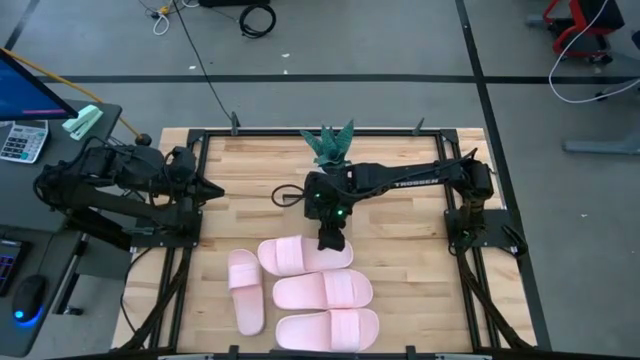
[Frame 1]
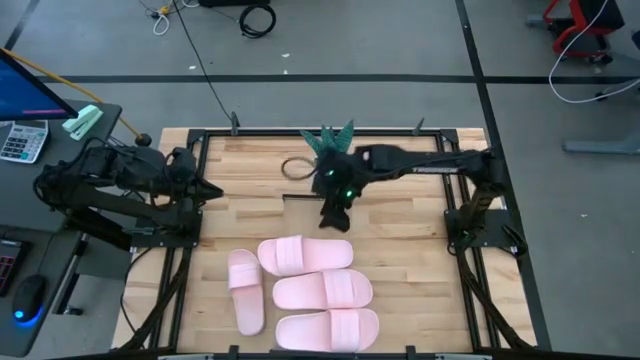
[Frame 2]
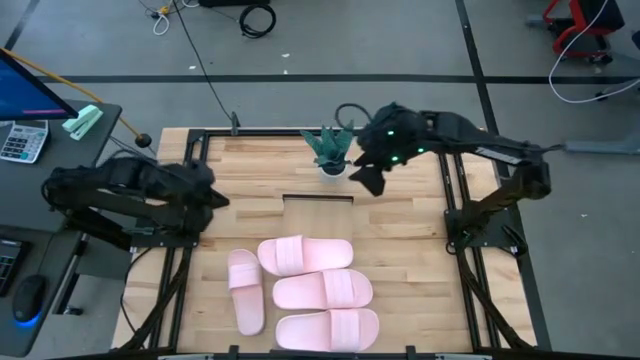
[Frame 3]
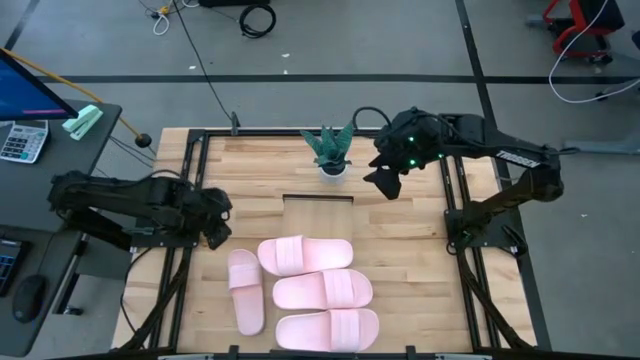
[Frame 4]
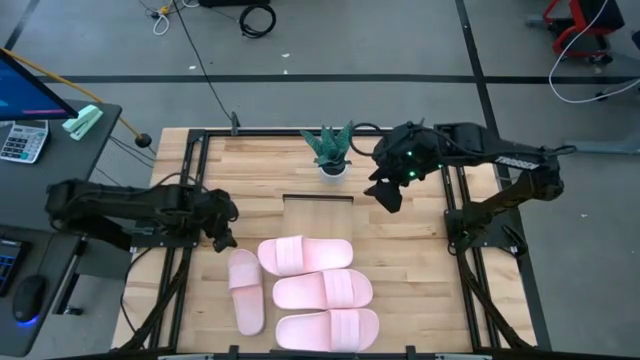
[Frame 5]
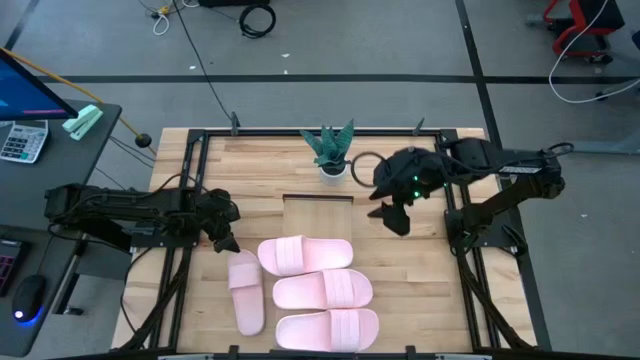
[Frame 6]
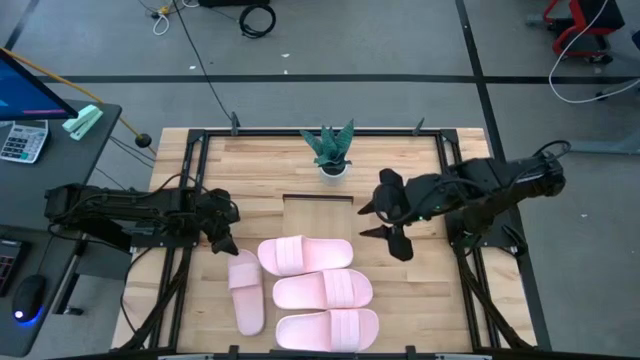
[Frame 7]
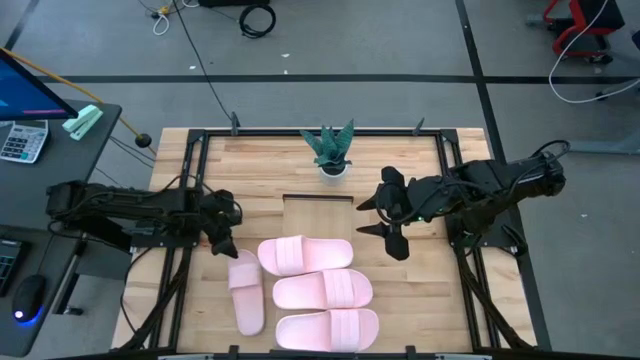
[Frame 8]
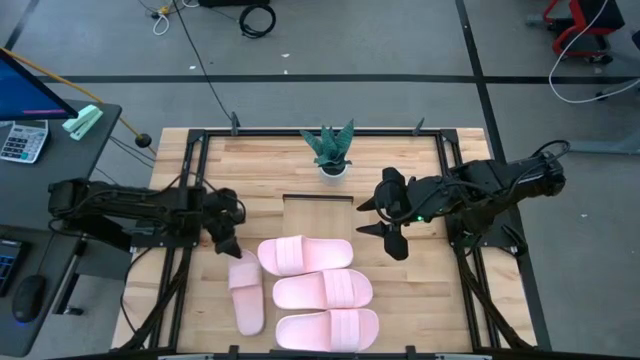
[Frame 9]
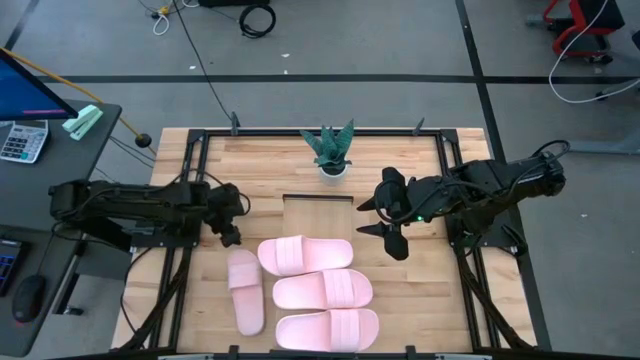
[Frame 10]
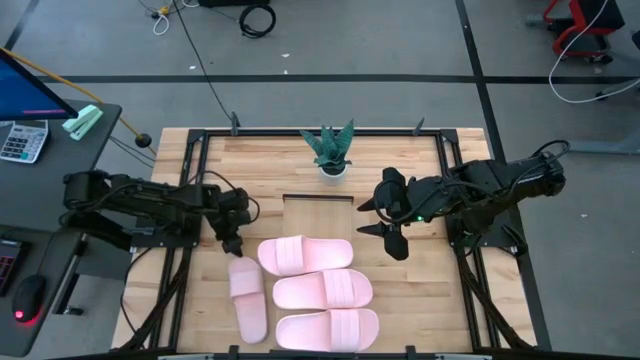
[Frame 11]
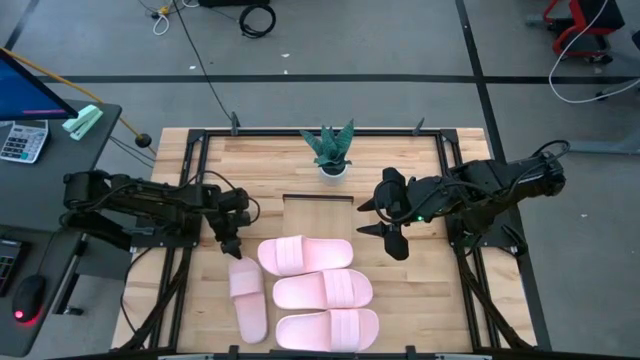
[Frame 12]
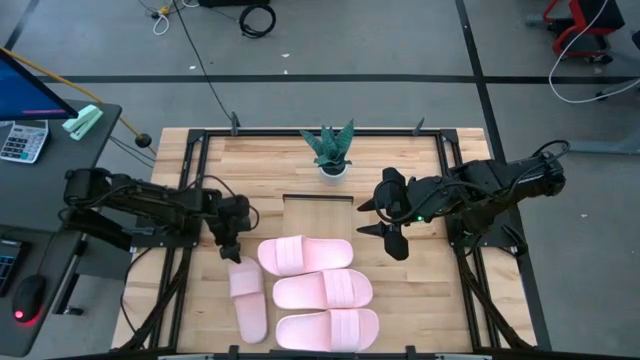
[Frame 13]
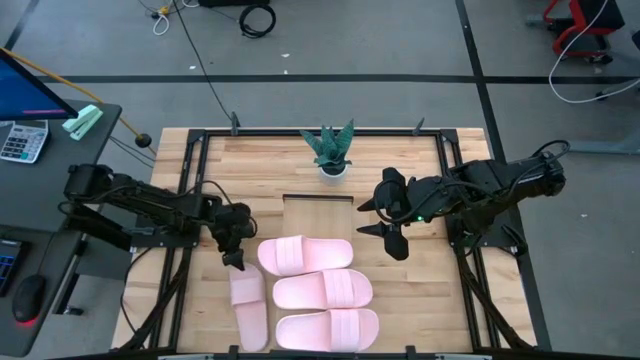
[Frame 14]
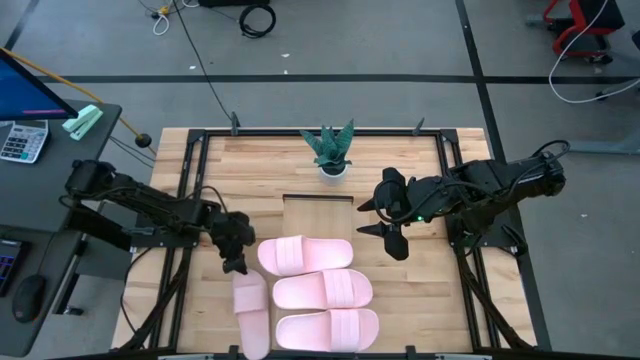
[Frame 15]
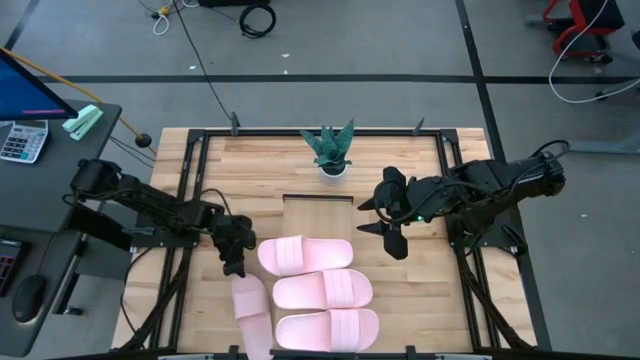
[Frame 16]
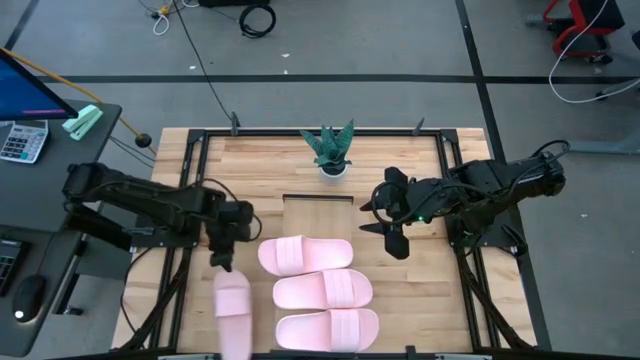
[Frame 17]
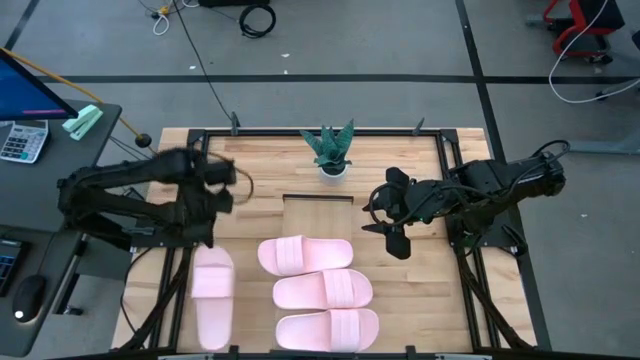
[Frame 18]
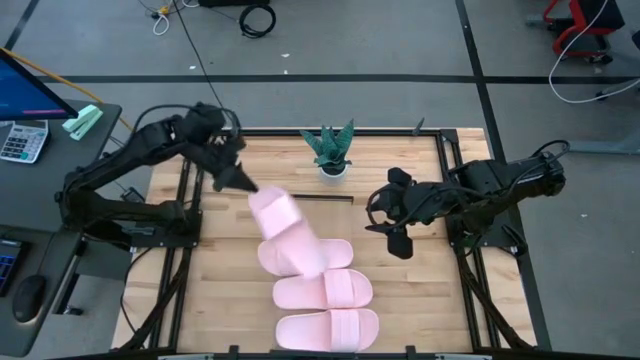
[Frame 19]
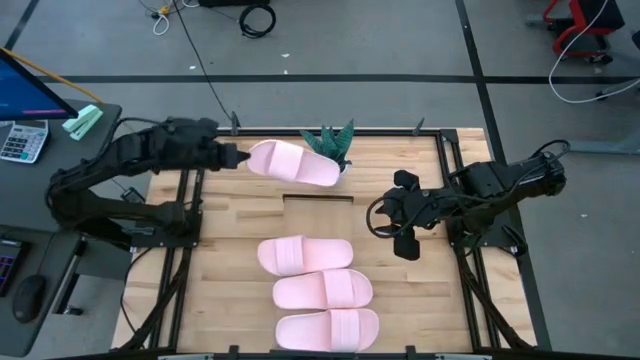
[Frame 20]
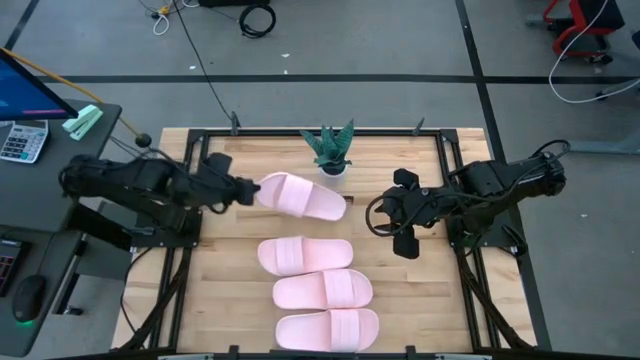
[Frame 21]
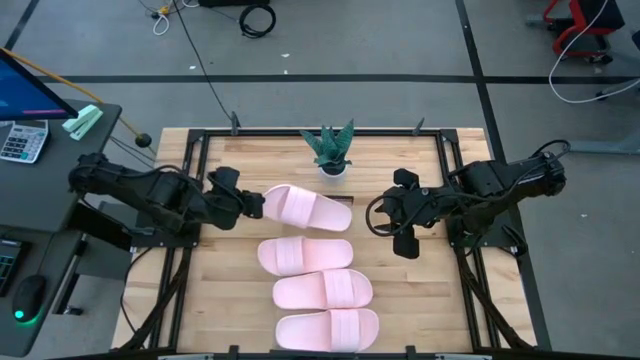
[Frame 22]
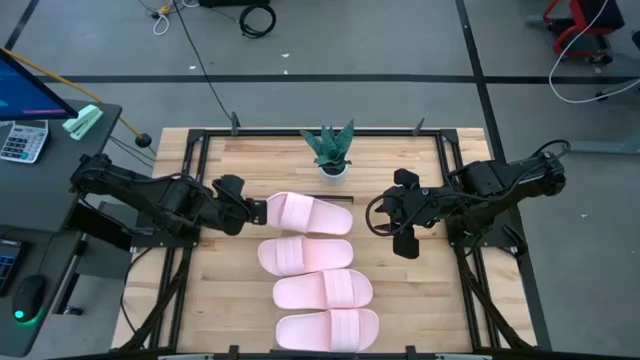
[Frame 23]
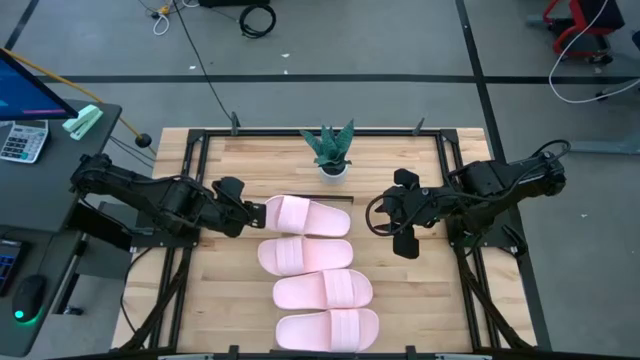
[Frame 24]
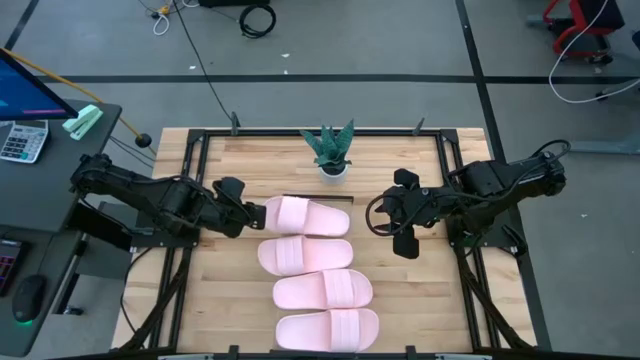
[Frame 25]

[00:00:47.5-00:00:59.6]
Task: Pick and place slides into the shelf
Put the pink slide on the shelf

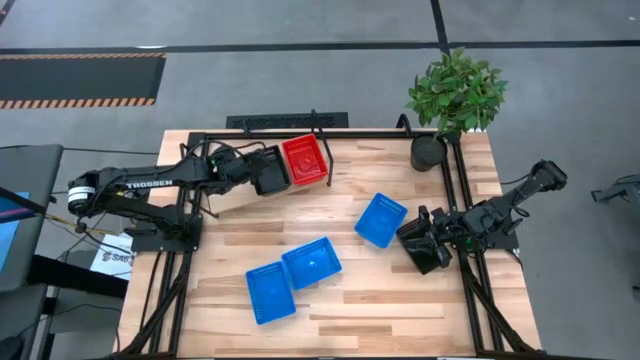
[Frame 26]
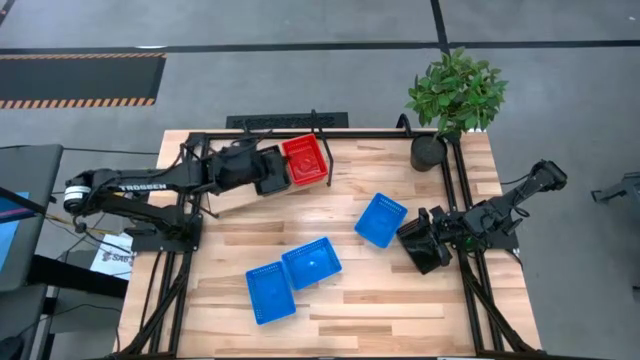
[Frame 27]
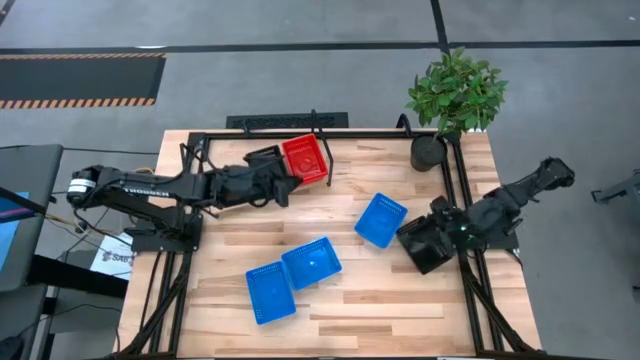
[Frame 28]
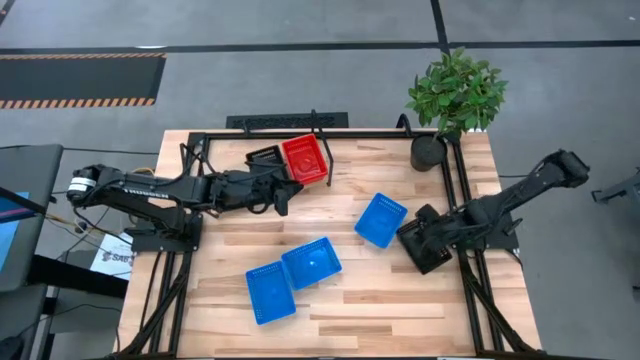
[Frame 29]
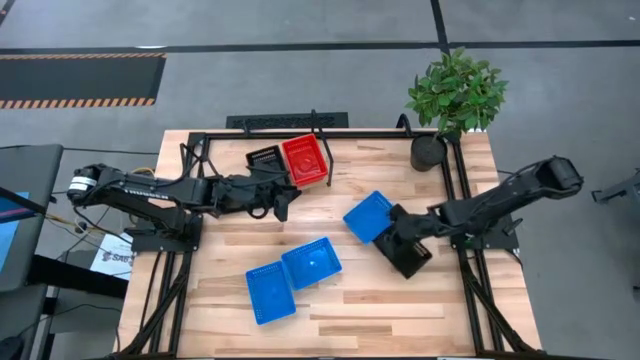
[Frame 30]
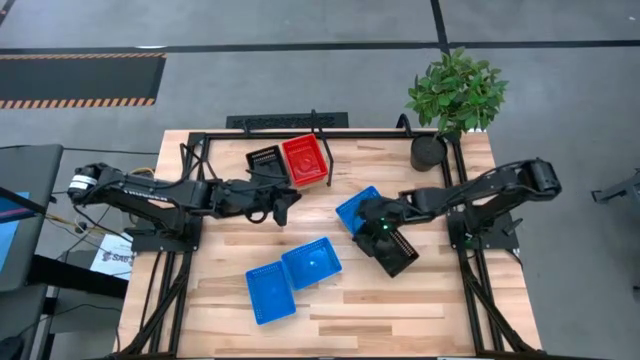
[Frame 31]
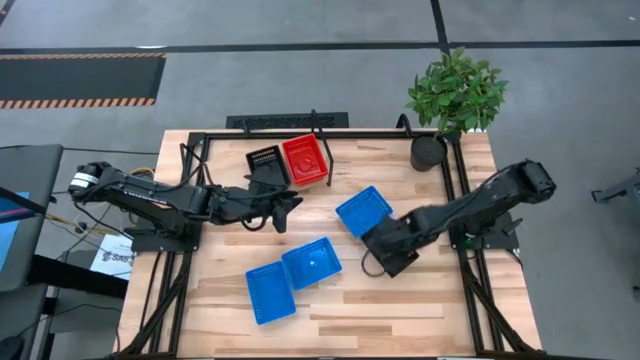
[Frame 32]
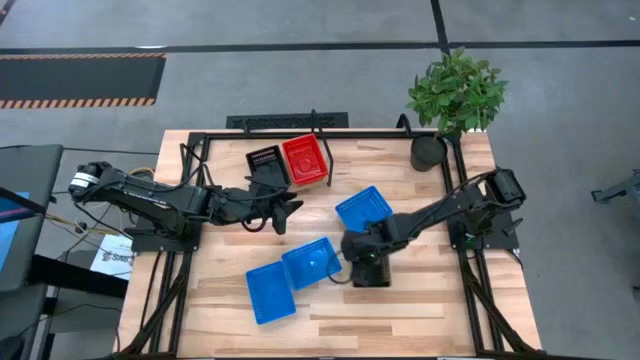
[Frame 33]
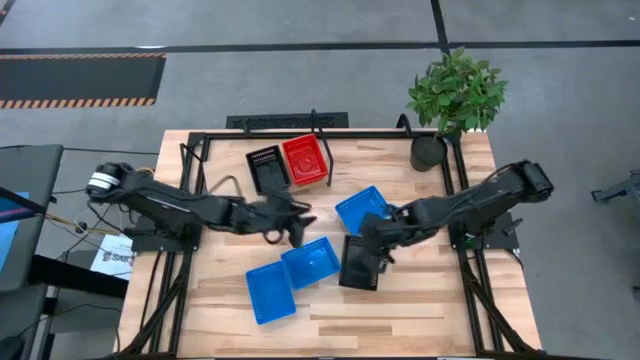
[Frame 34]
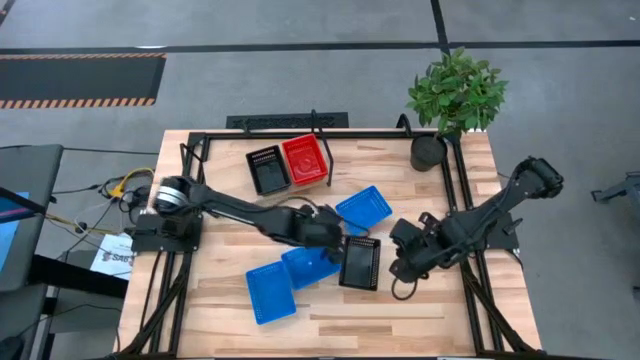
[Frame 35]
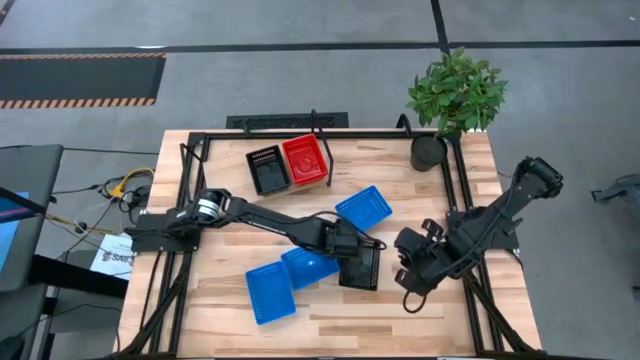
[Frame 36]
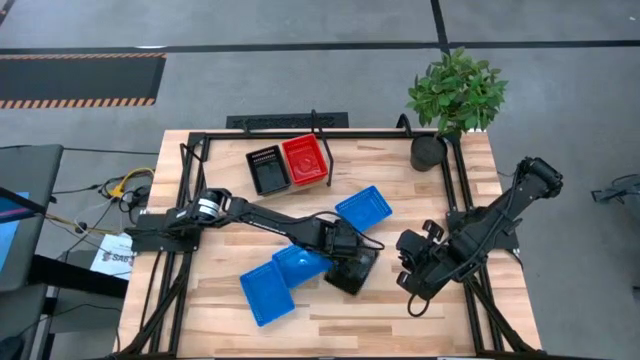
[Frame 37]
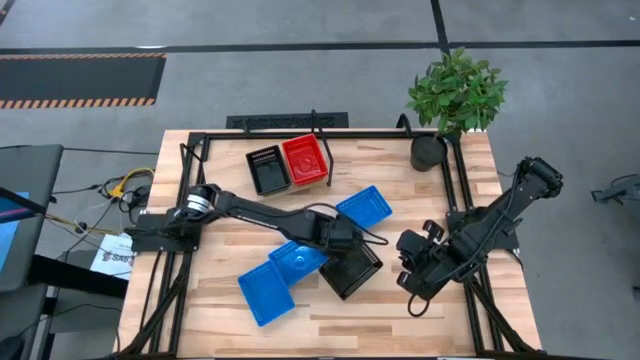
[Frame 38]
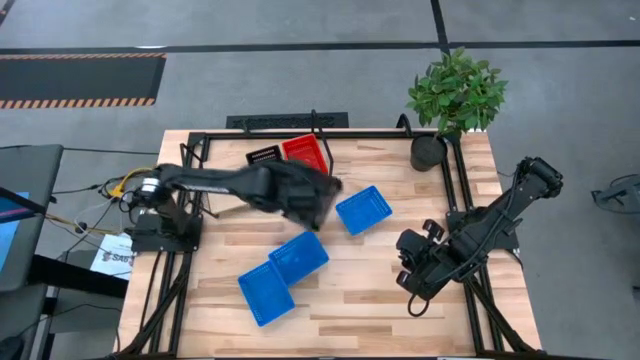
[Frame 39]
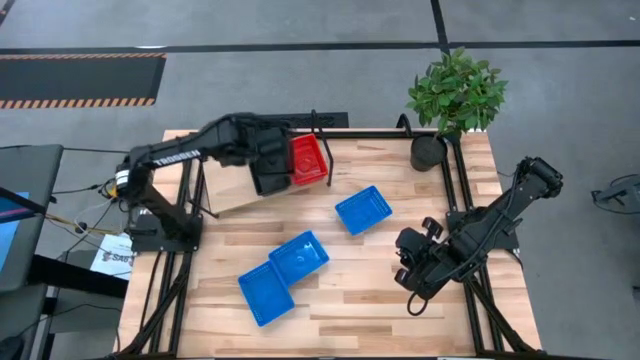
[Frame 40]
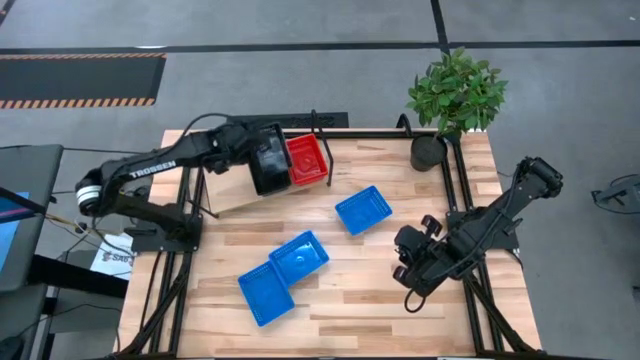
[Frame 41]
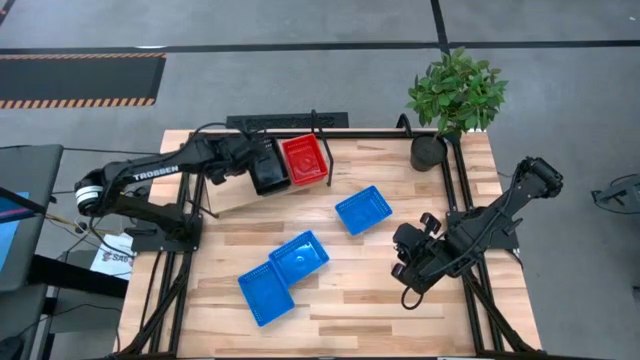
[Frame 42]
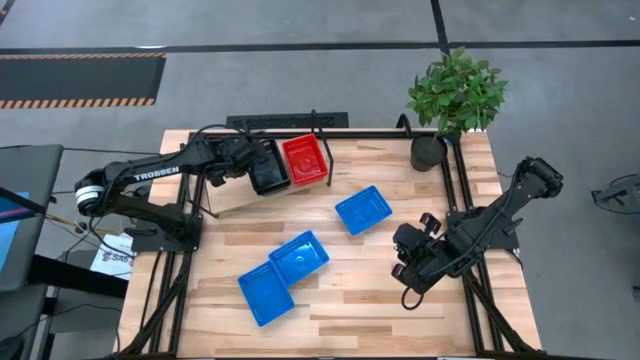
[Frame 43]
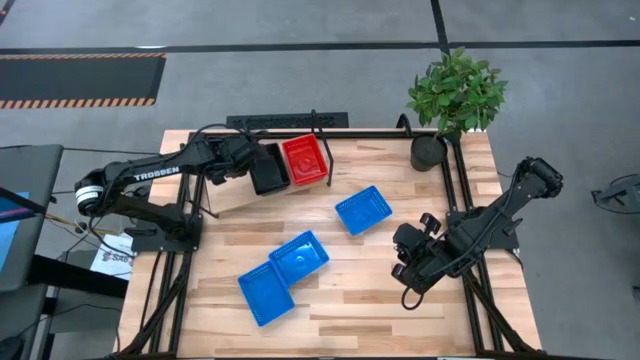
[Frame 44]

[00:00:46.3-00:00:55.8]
Task: Stack baskets on shelf by color
Stack the black bin on top of the black bin on the shelf
